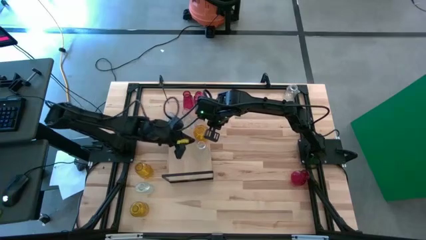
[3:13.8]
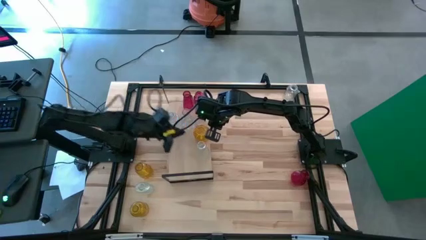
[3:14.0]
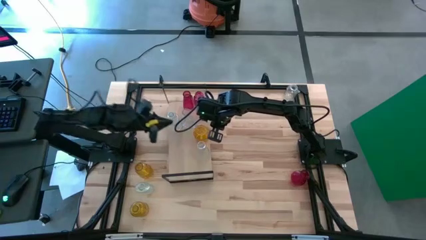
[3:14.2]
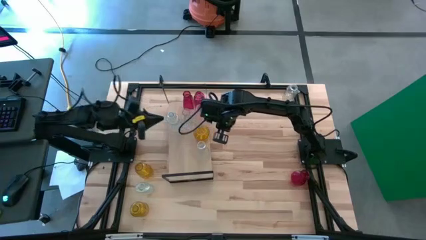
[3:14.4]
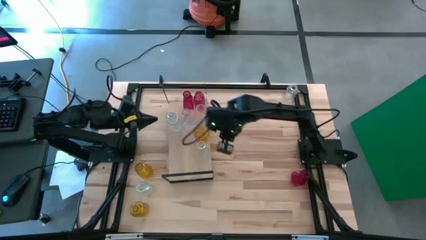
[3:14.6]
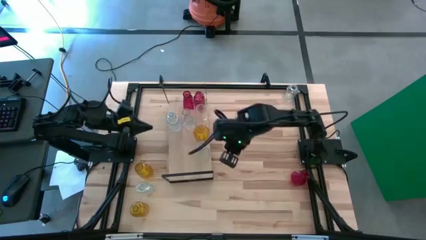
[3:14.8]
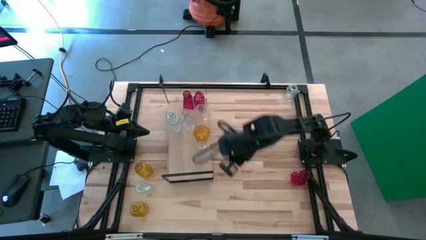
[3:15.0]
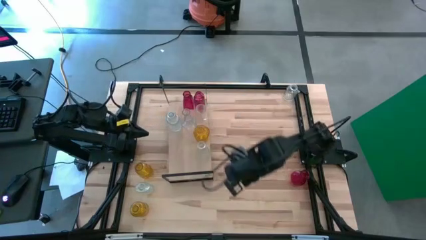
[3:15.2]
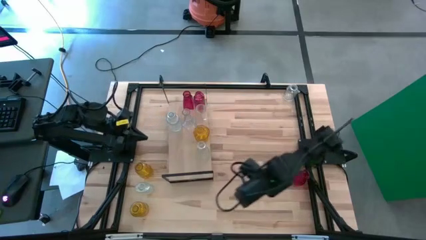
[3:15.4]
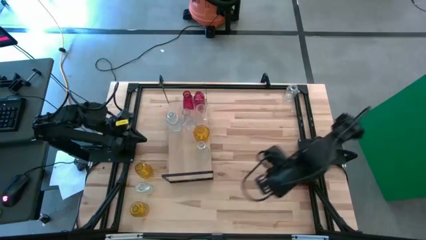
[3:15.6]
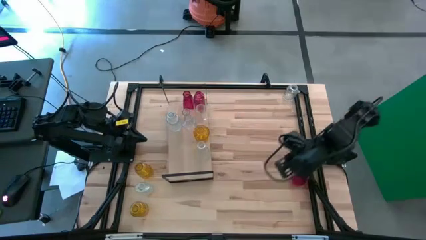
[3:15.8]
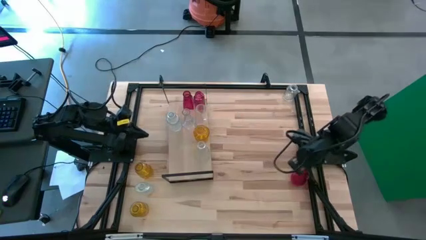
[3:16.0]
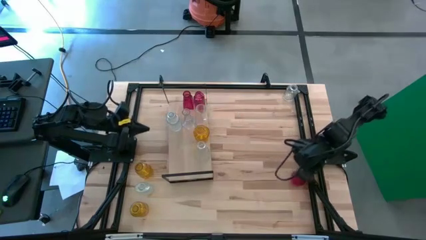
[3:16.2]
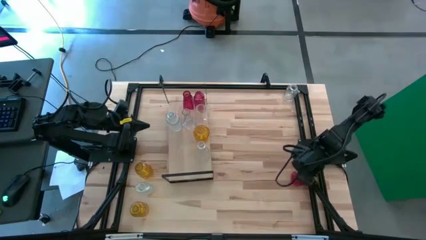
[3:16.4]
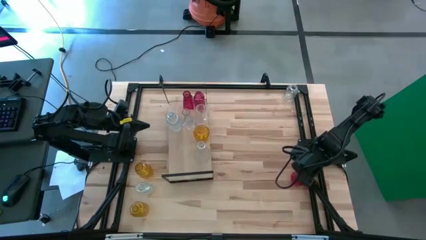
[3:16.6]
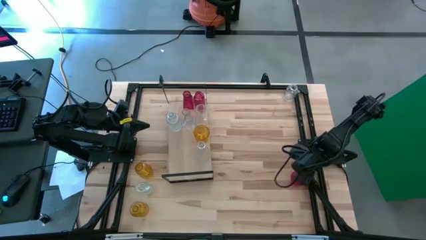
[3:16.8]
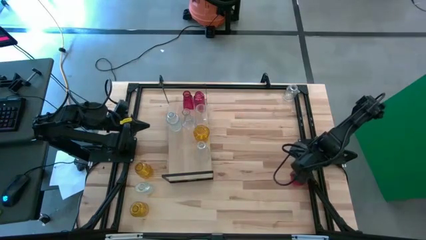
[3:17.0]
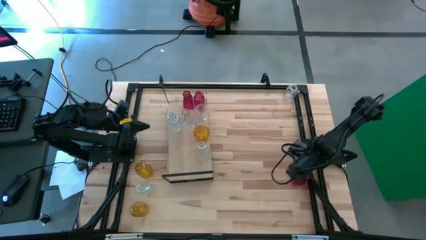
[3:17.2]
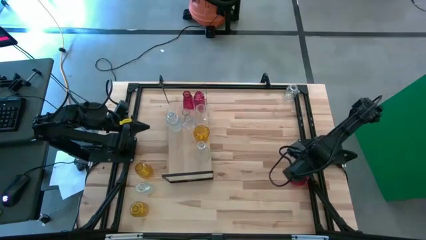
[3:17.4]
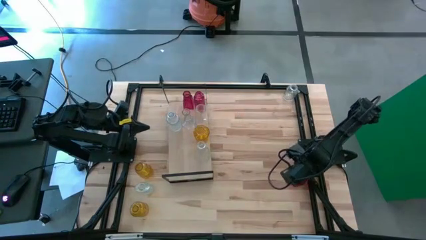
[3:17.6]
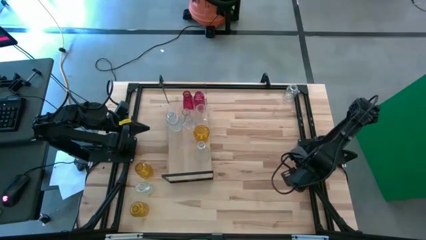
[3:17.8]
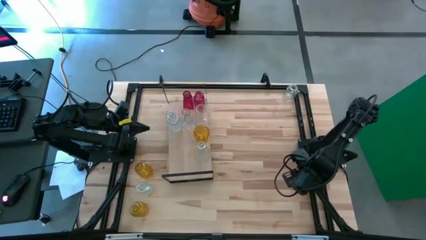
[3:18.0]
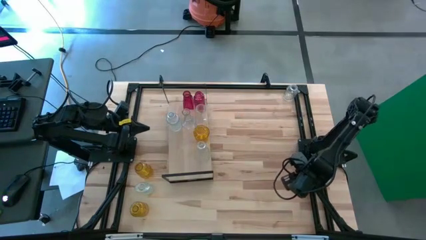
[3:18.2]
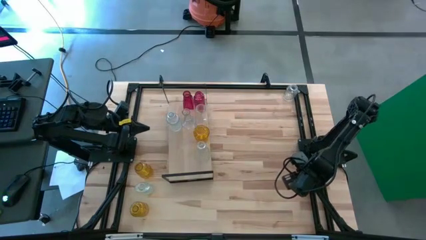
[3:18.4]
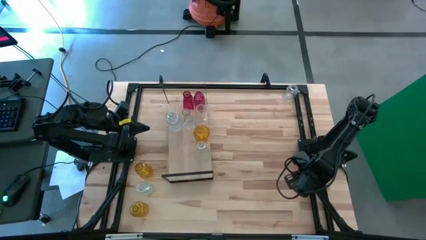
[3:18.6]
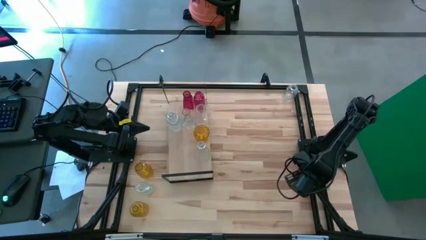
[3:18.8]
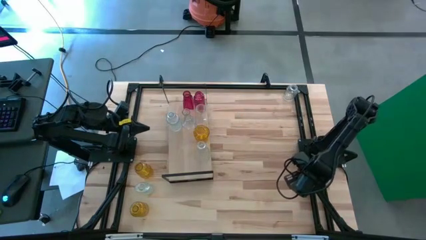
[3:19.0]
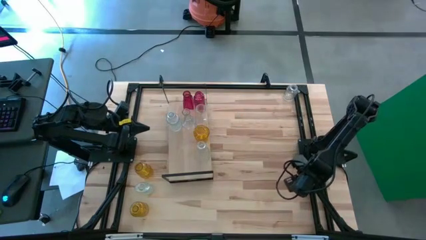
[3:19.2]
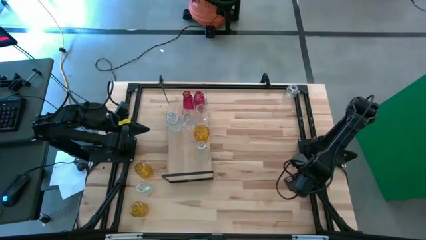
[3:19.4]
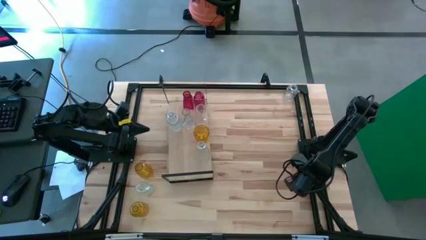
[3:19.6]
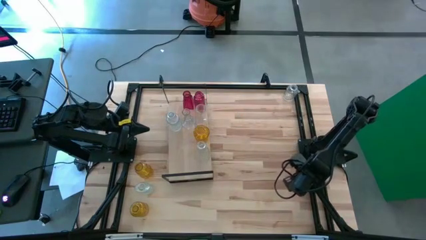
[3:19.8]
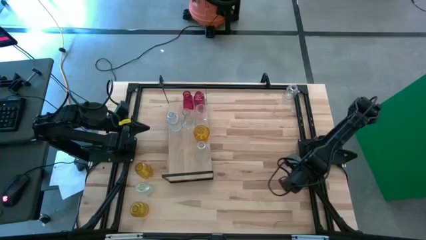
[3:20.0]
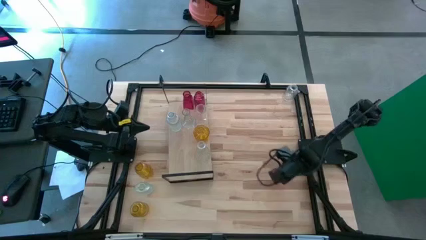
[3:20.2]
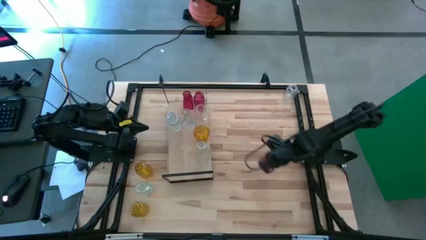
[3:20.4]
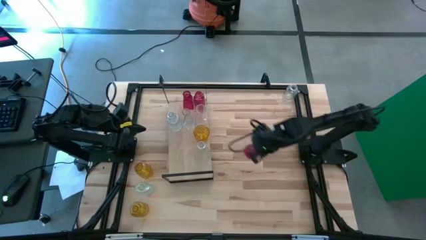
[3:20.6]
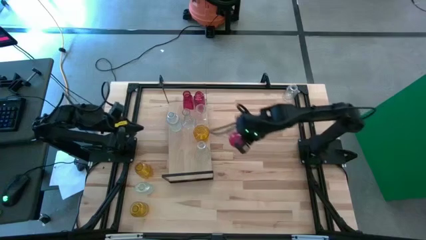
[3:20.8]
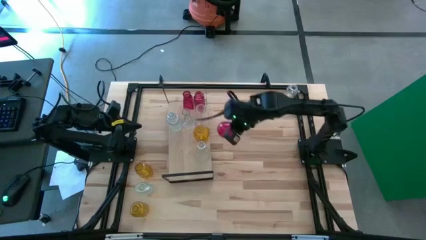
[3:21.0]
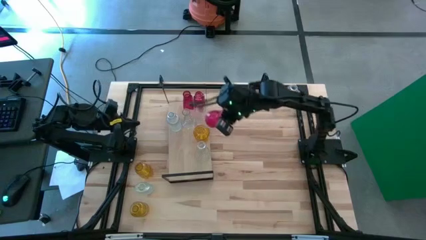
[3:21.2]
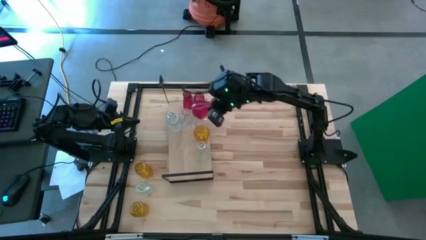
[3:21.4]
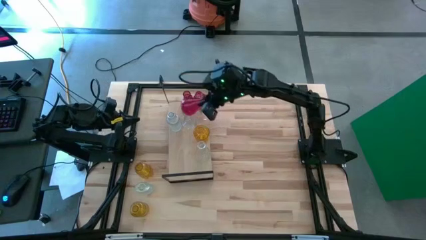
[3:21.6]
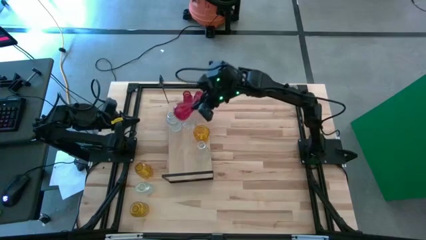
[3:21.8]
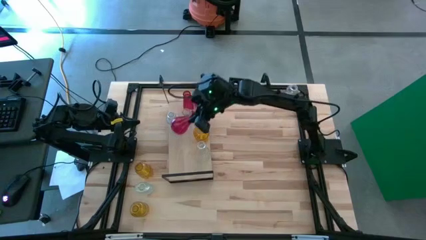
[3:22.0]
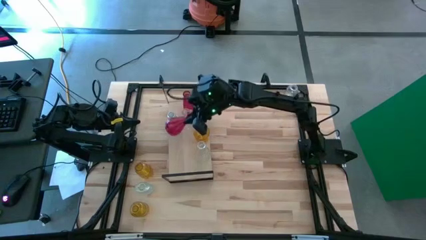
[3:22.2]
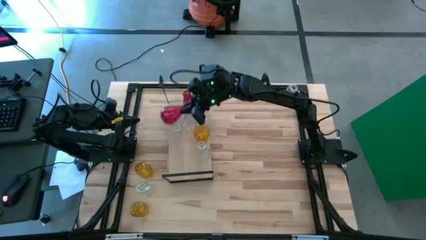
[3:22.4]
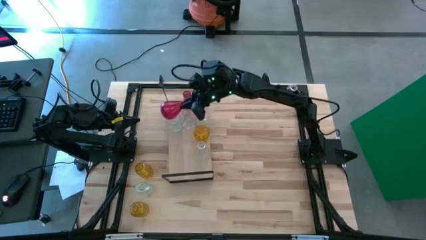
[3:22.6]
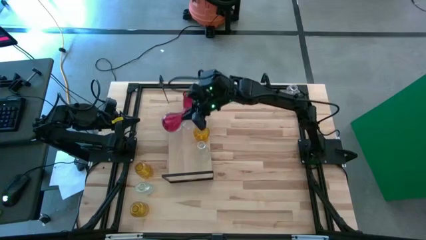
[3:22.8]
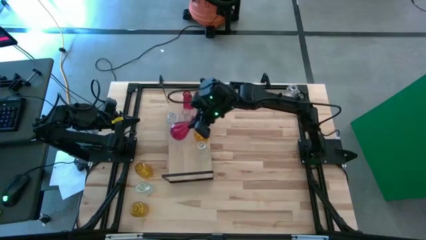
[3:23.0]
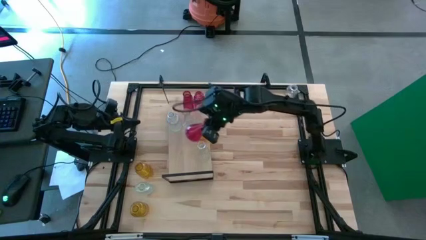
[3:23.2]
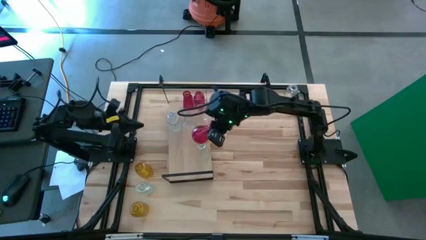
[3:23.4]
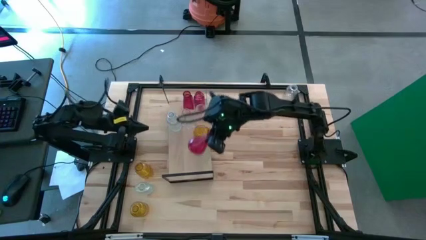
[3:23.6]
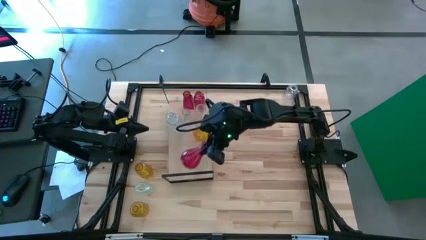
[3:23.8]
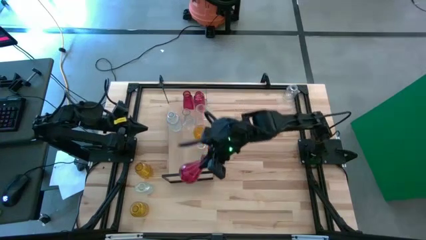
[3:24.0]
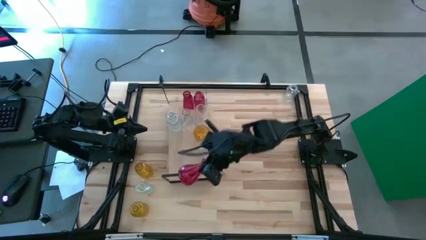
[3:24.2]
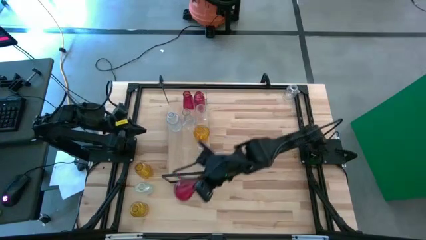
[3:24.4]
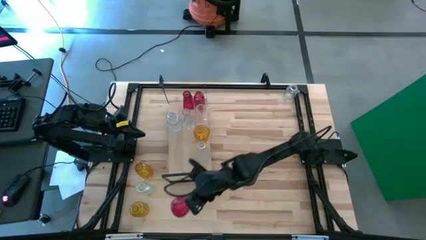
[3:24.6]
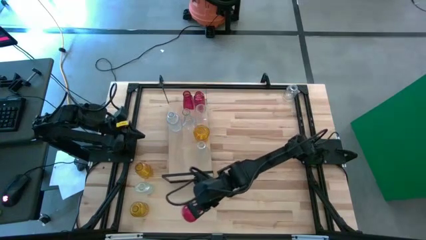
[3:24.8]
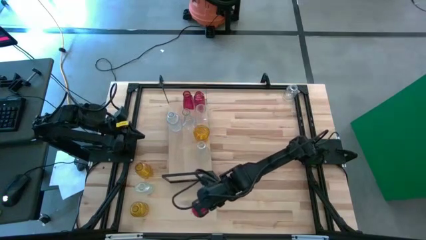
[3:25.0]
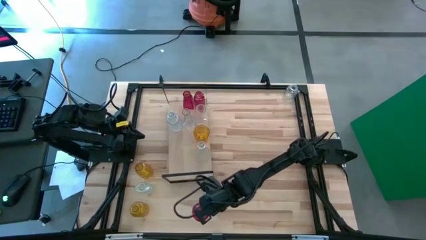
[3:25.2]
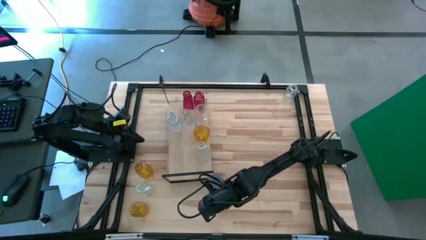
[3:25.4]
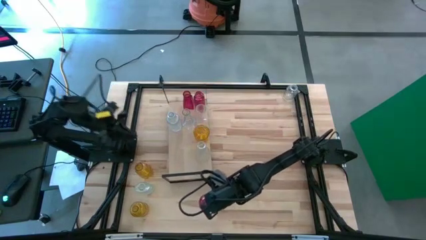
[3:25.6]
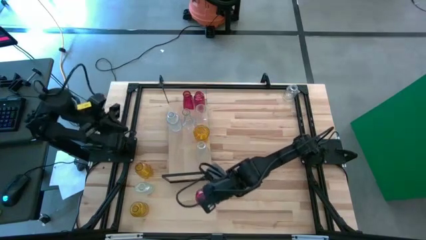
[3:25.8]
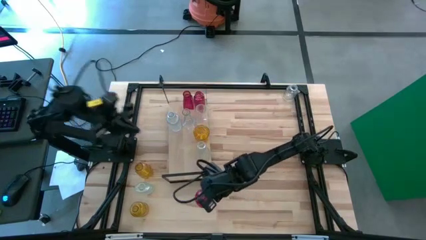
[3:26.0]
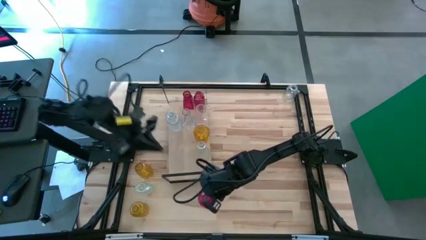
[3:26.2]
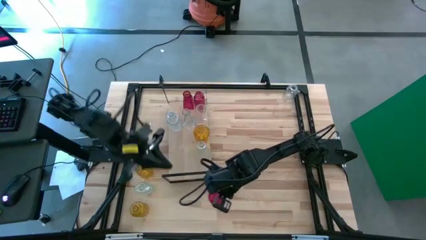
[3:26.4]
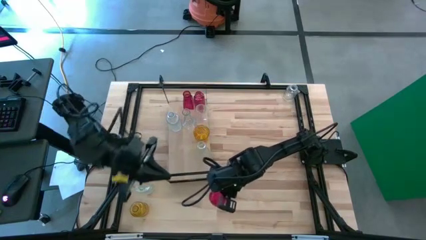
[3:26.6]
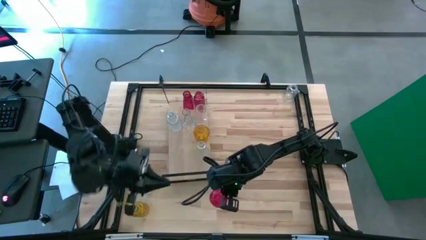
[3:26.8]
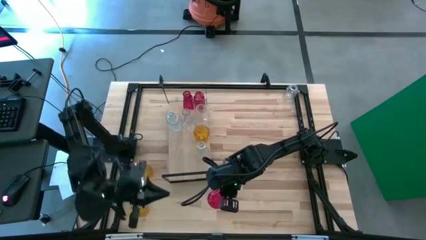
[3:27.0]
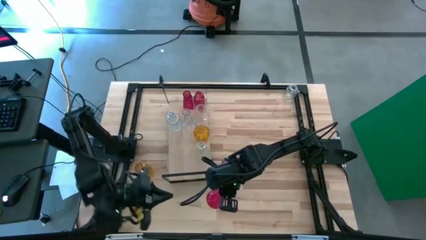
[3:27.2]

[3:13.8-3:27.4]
Task: sort vases onto shelf
Put the red vase on the shelf aligned with the other red vase

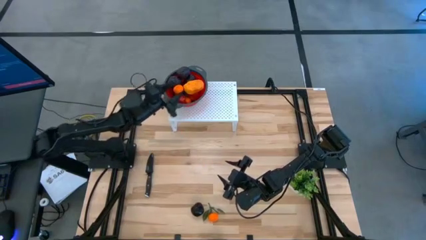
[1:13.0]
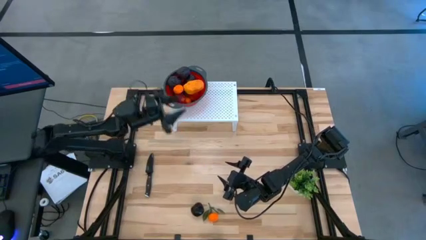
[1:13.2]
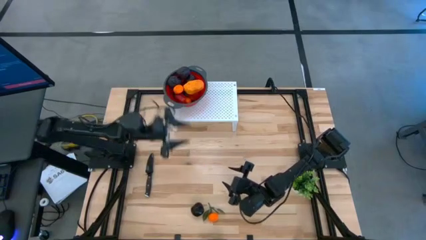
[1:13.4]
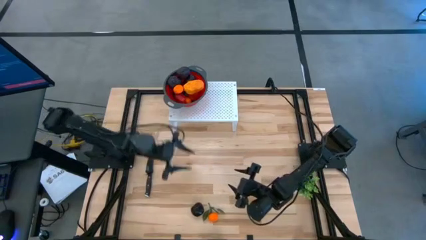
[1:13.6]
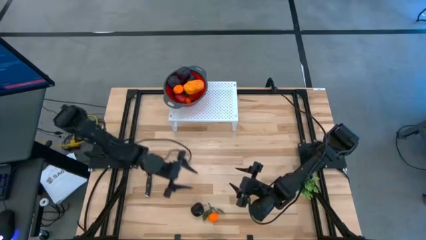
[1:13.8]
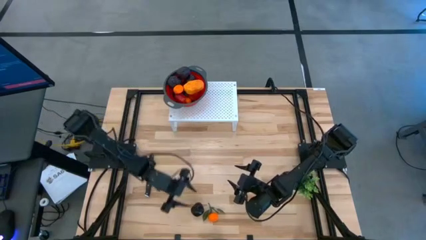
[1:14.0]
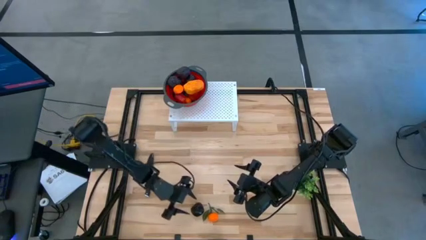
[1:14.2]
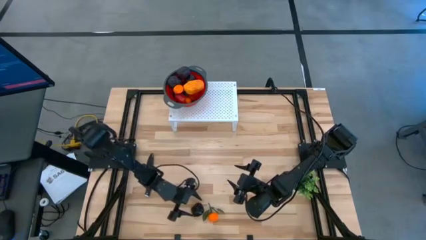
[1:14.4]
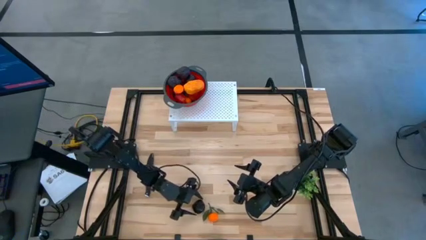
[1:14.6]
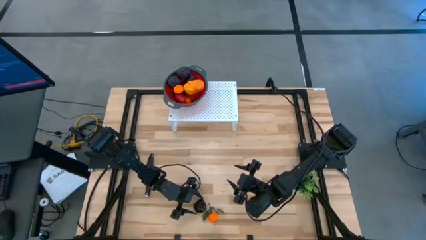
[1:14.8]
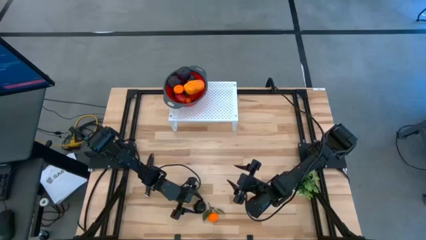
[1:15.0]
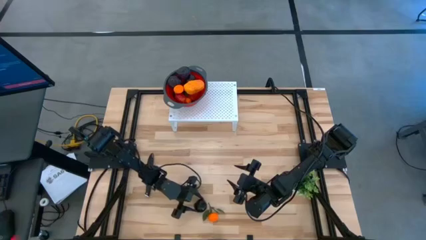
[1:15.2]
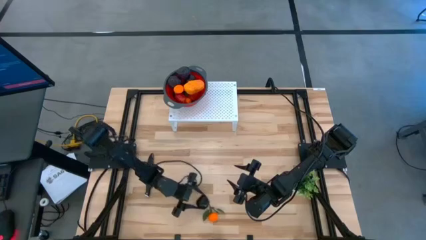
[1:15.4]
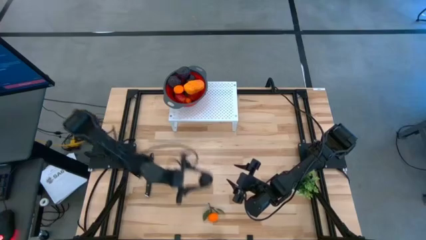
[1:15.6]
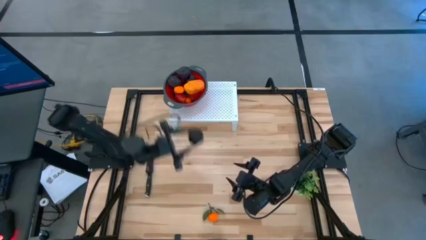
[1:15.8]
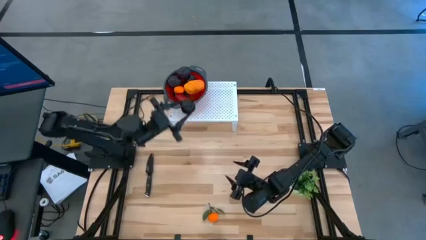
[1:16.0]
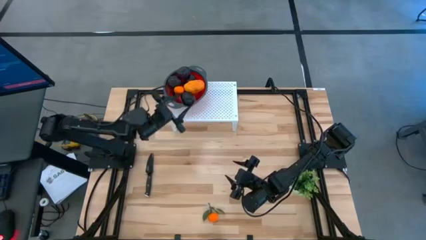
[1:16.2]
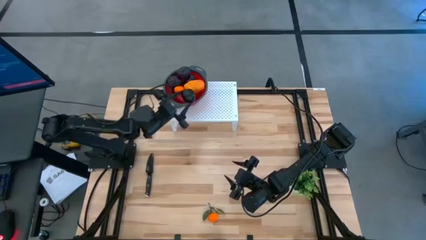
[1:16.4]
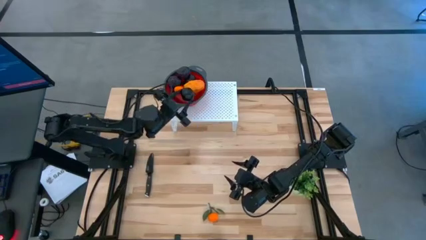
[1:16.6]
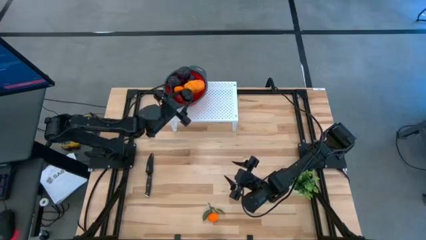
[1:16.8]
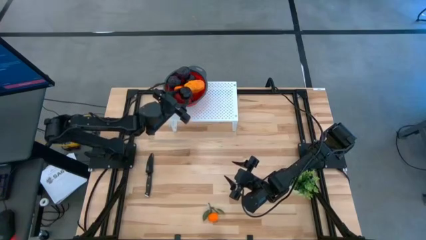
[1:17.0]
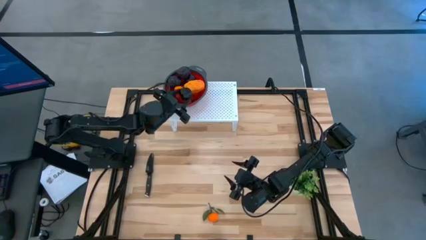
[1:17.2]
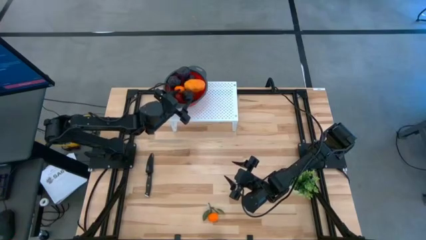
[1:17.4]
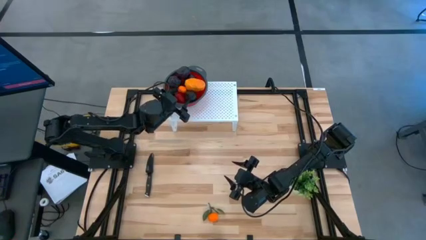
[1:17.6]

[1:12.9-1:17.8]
Task: Pick & Place Fruit
Put the purple plum into the red strainer bowl on the shelf
